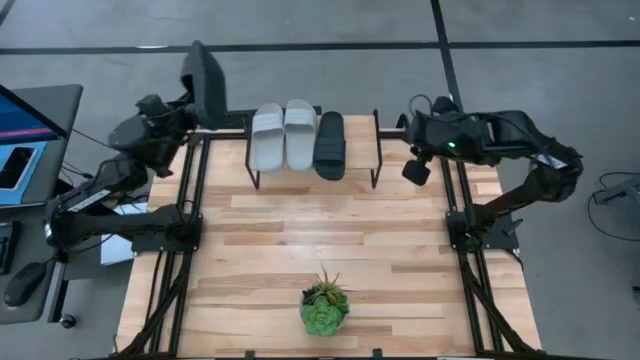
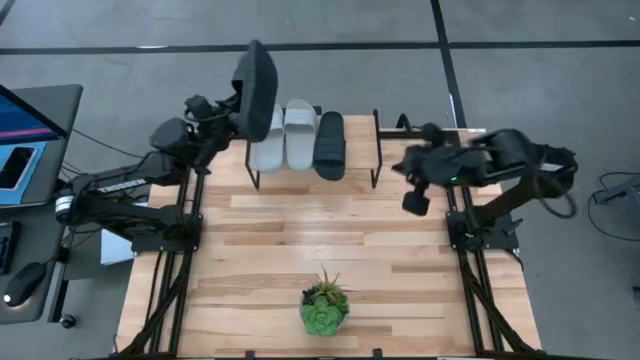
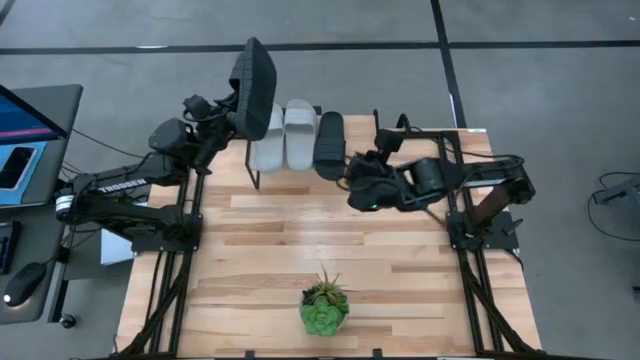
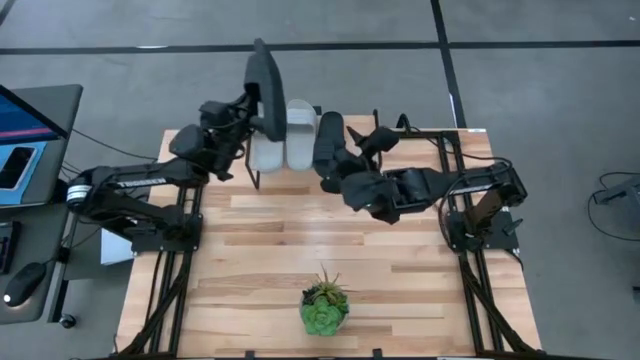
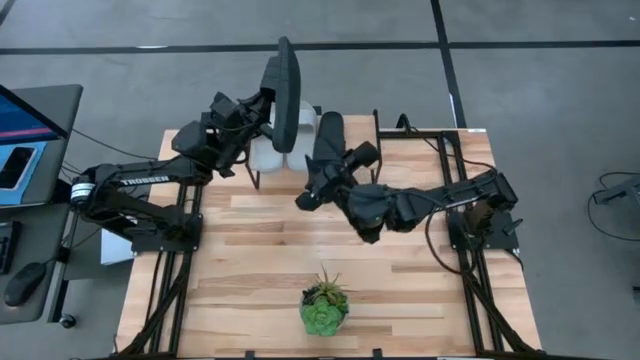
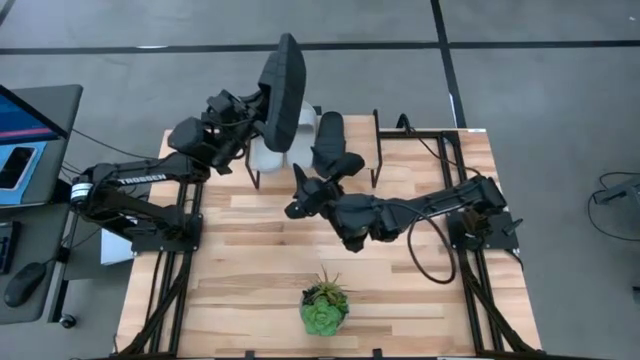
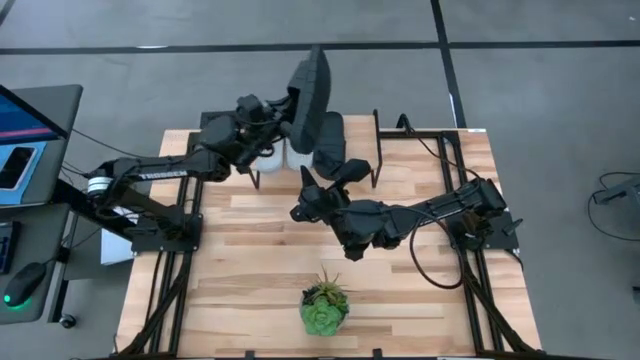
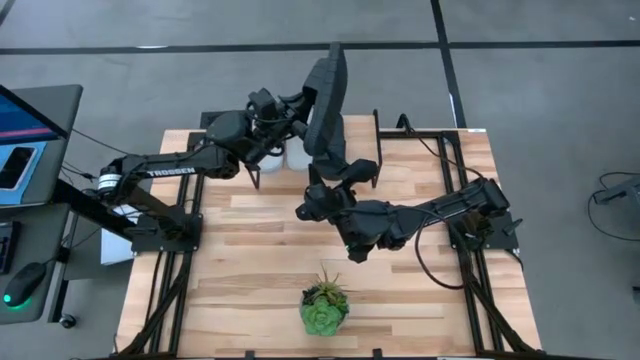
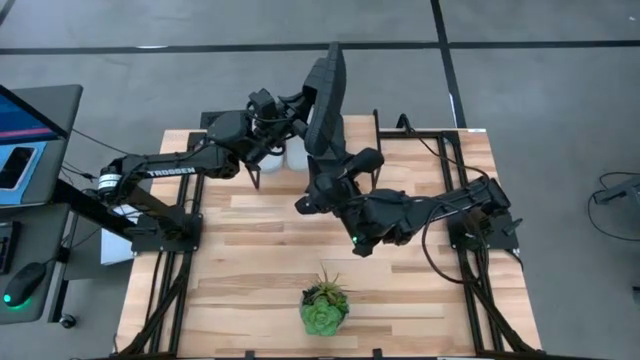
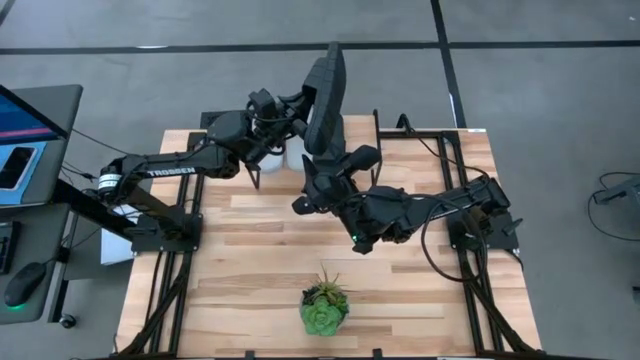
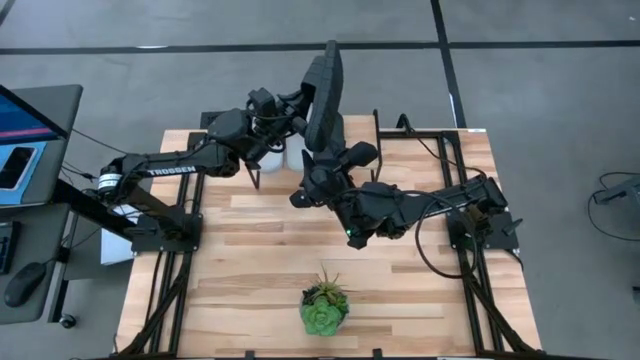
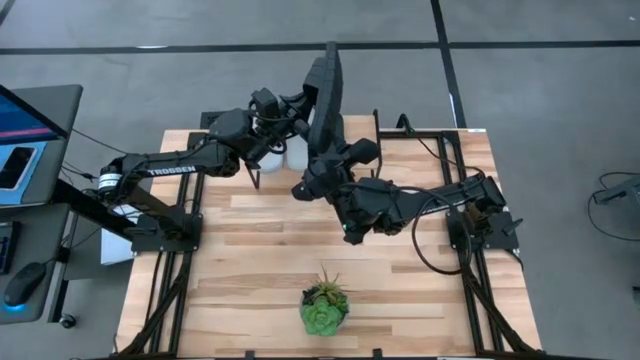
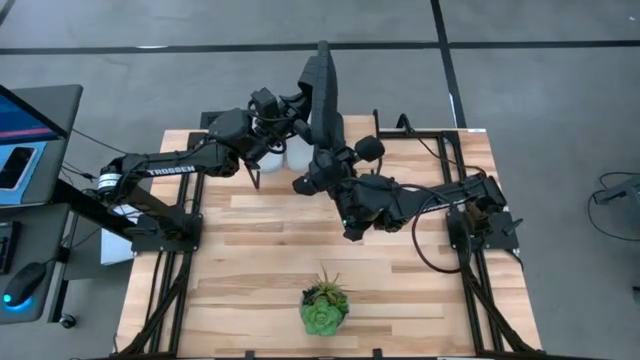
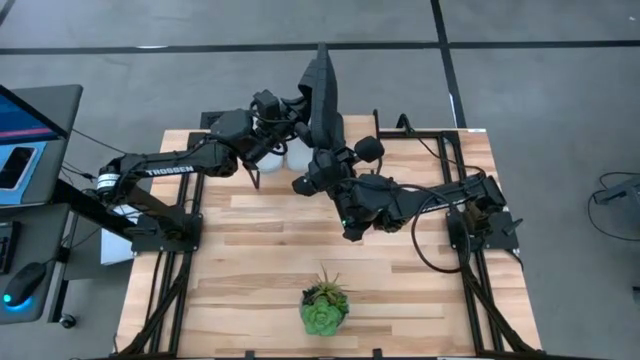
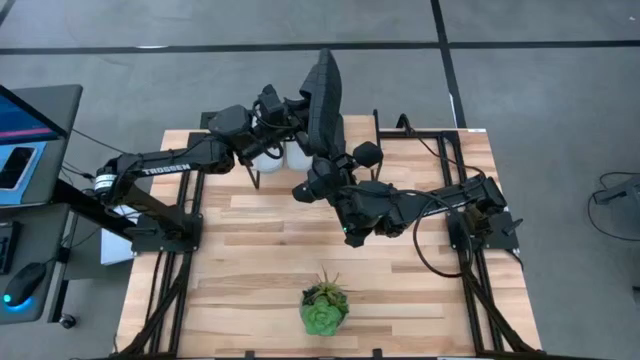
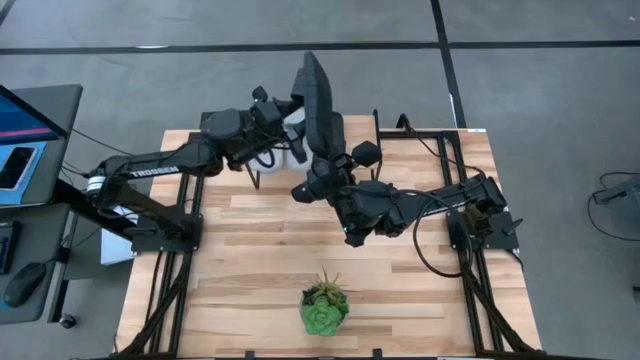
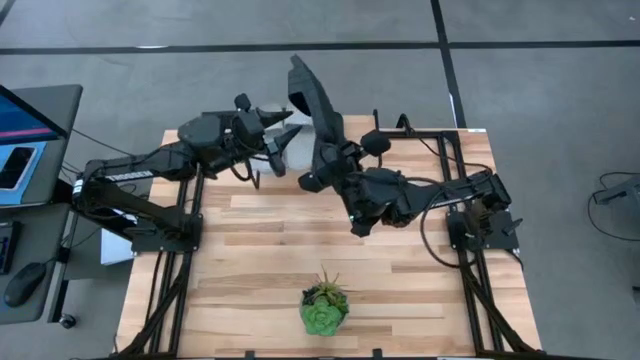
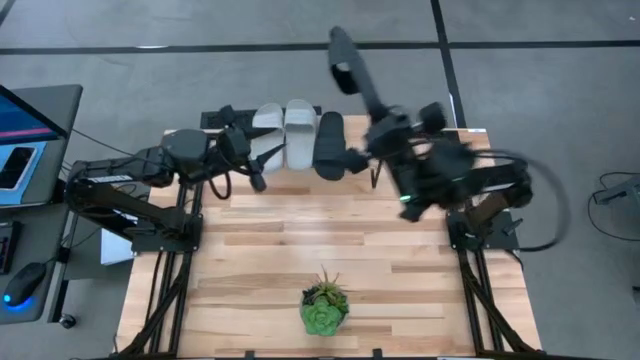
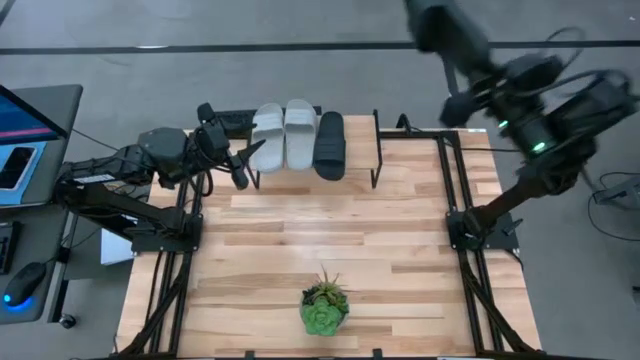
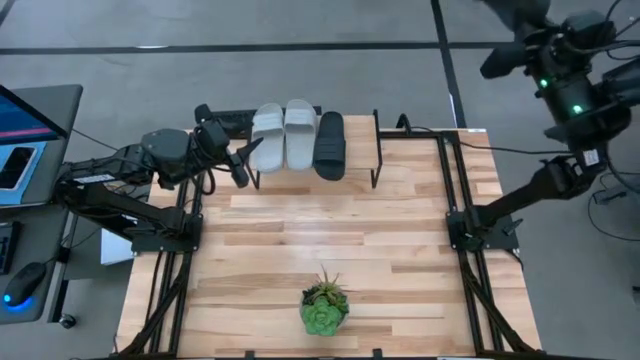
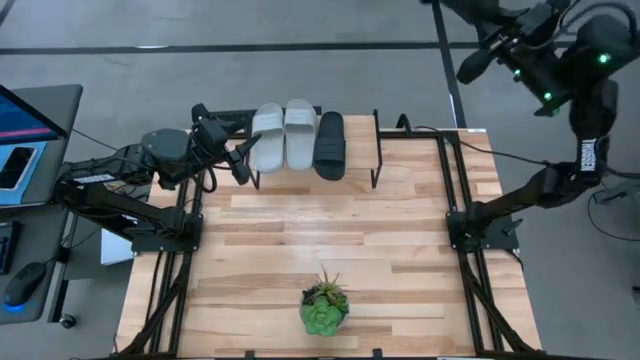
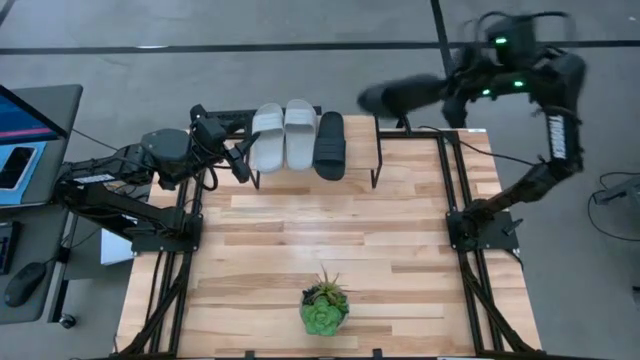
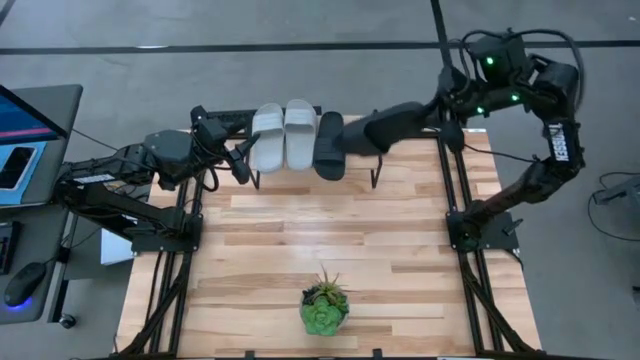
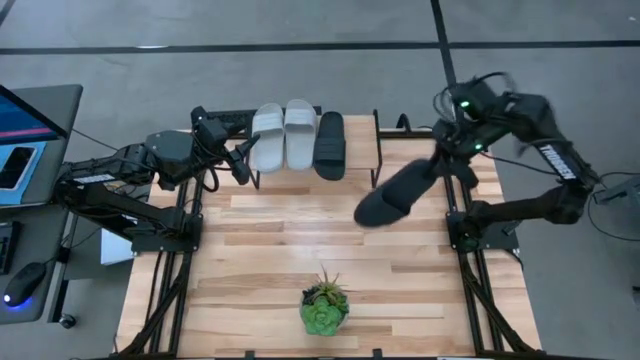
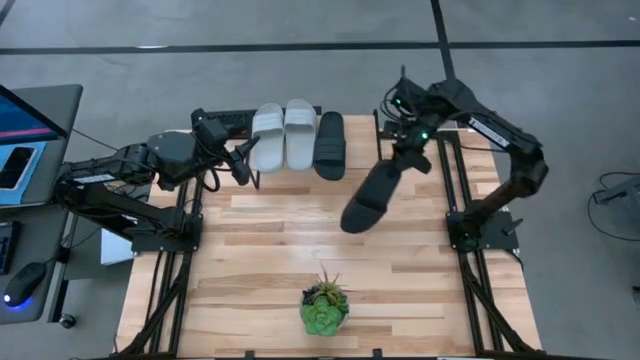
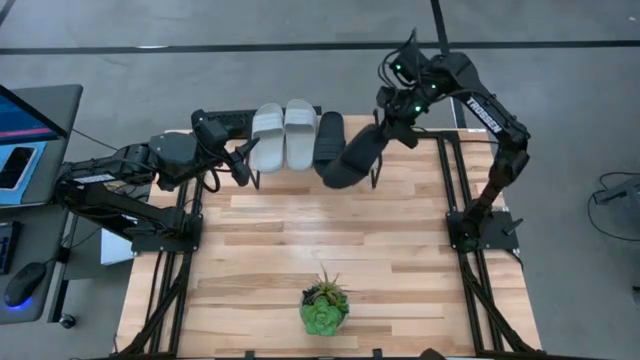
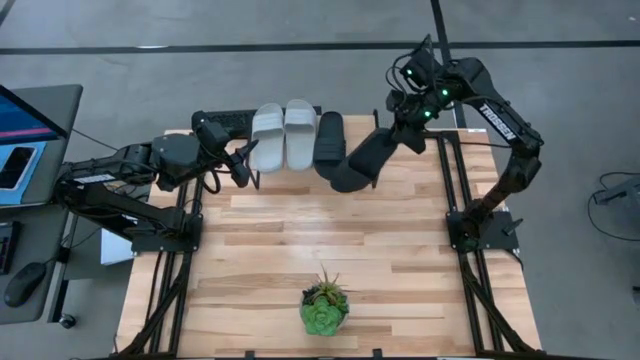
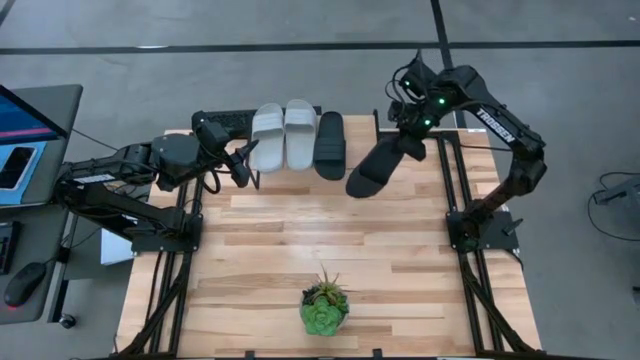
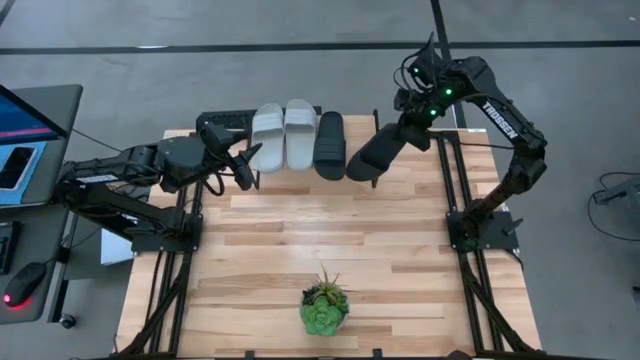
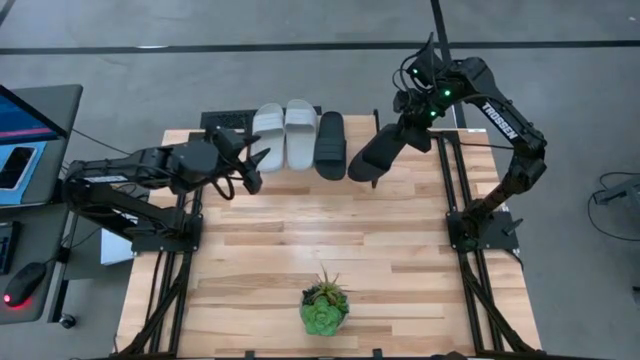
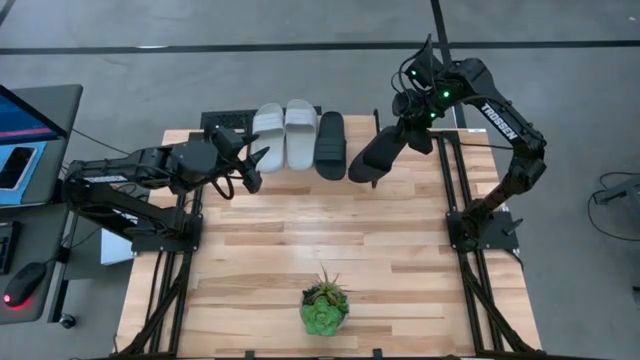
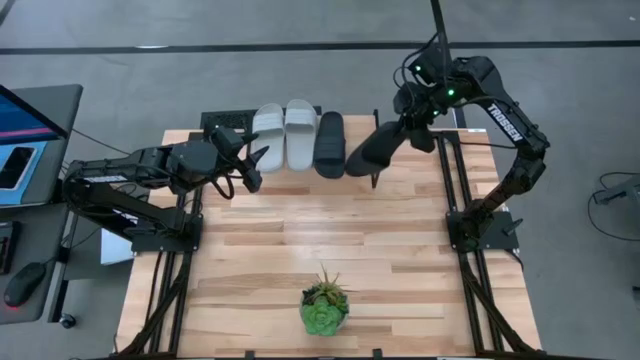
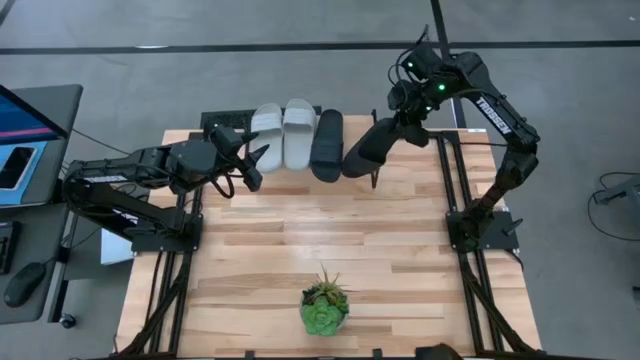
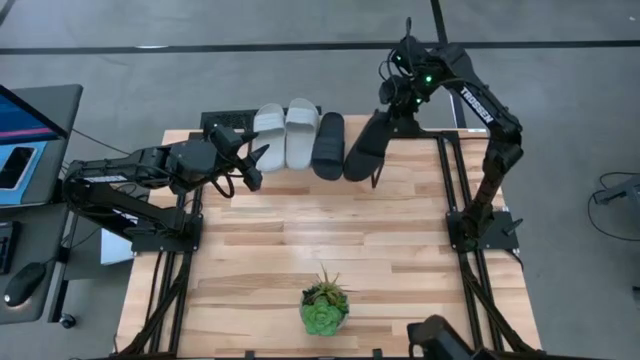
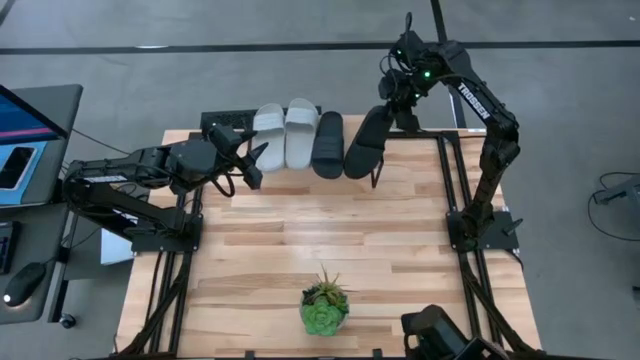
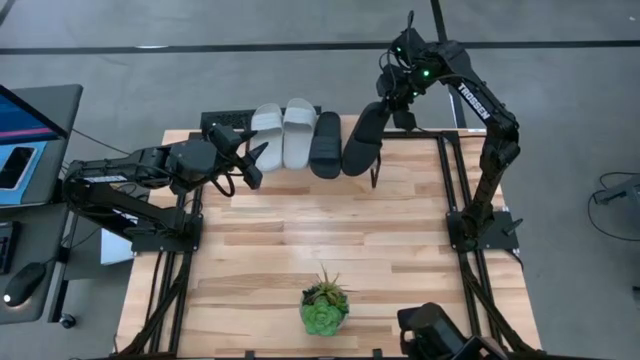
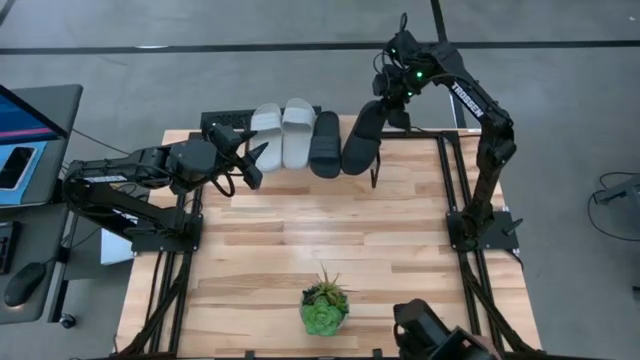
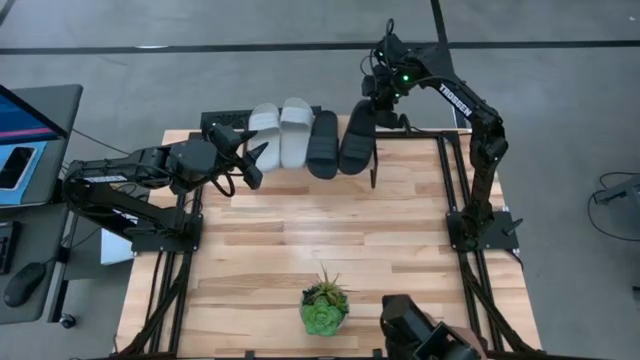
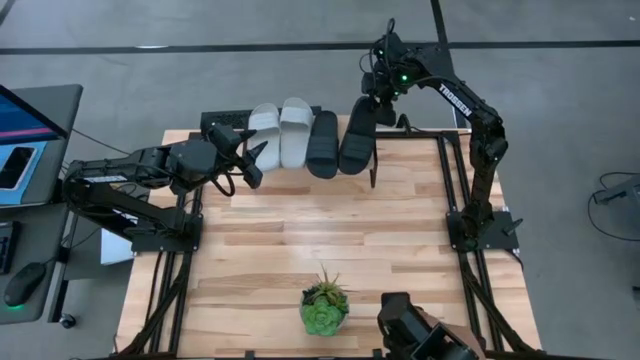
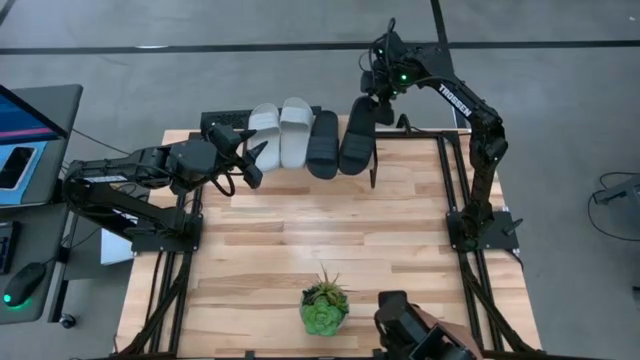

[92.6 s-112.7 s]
Task: Pick and place slides into the shelf
Put the black slide on the shelf
